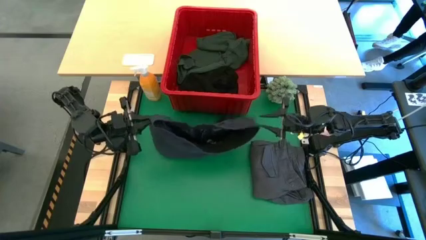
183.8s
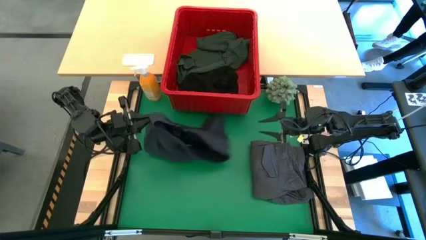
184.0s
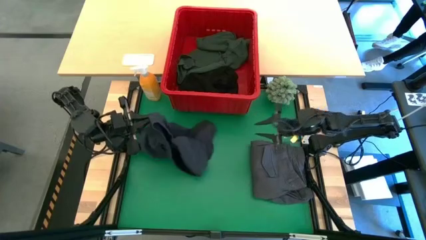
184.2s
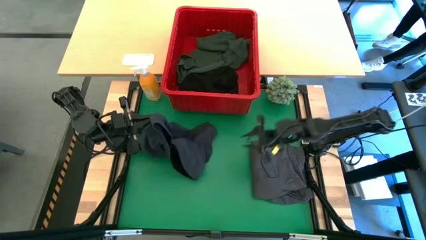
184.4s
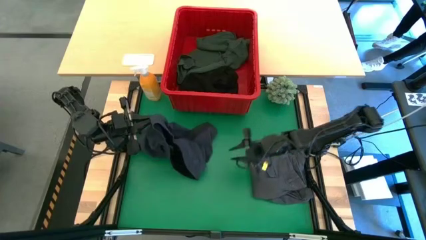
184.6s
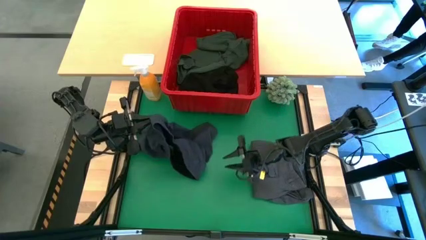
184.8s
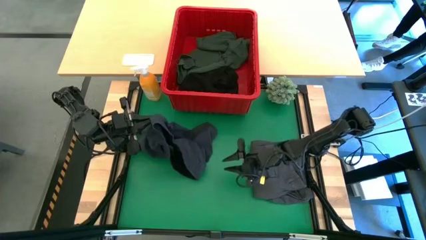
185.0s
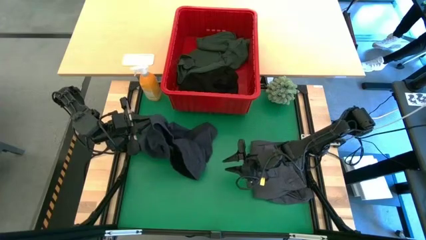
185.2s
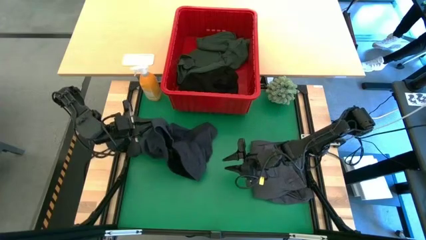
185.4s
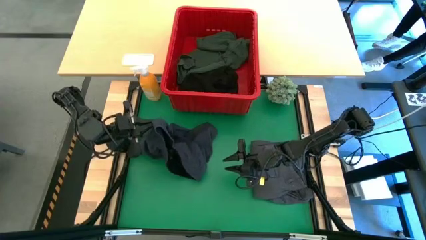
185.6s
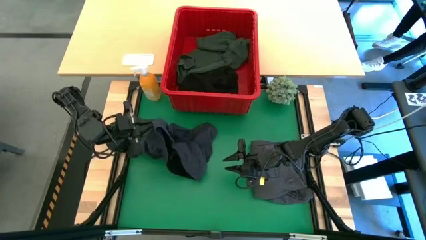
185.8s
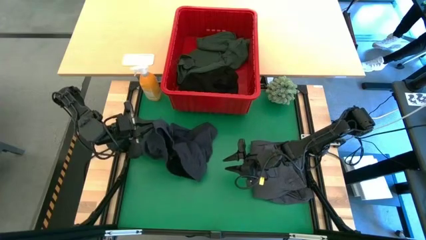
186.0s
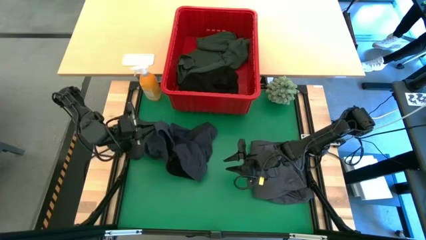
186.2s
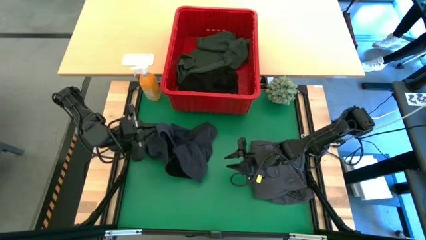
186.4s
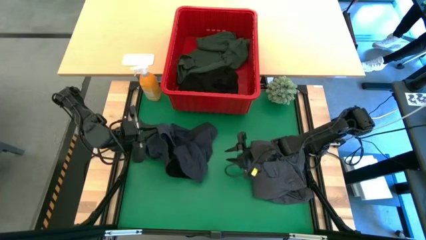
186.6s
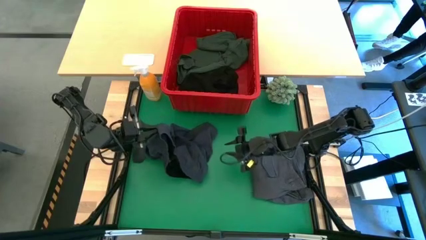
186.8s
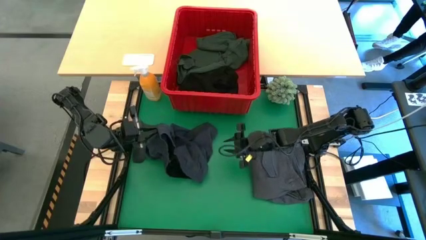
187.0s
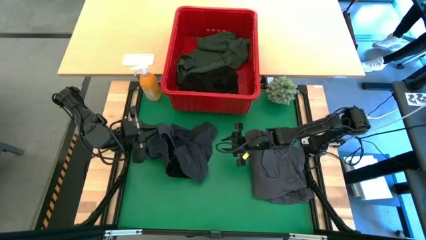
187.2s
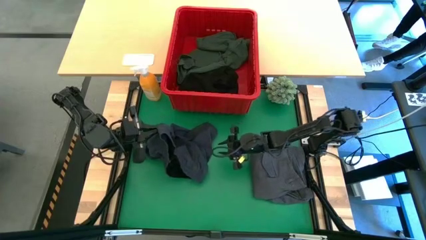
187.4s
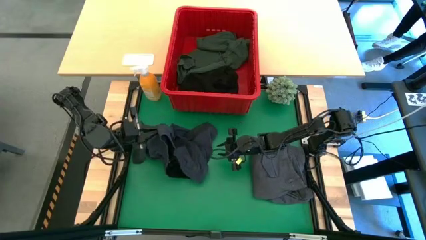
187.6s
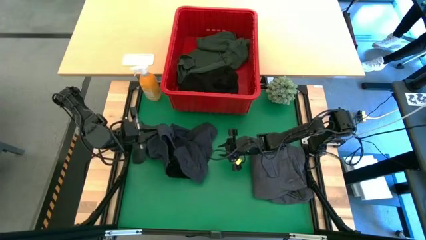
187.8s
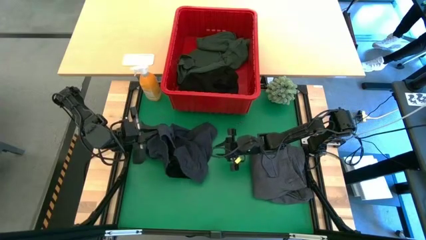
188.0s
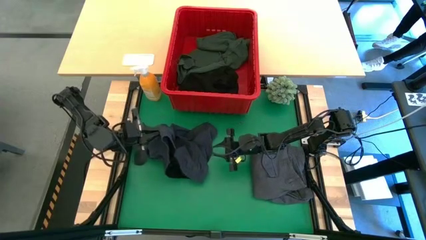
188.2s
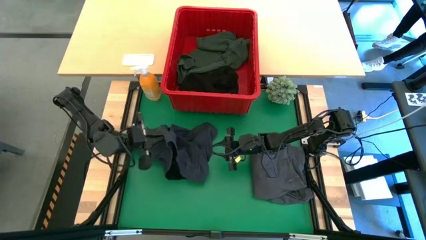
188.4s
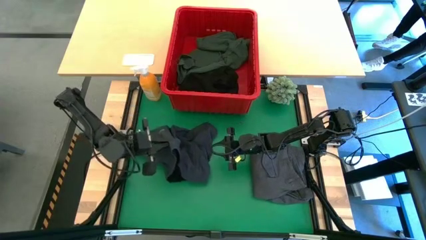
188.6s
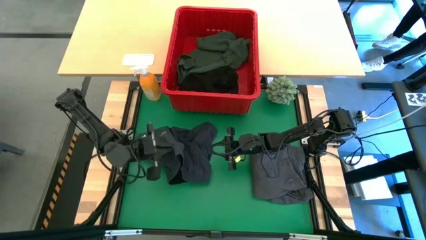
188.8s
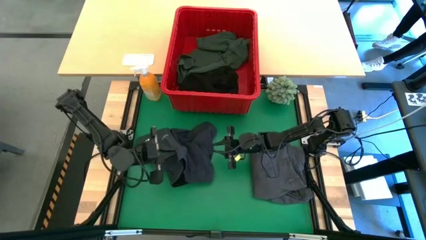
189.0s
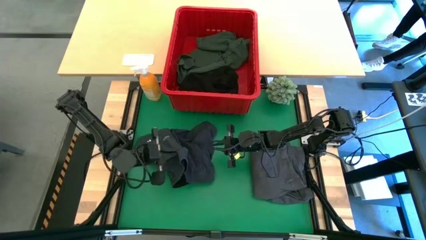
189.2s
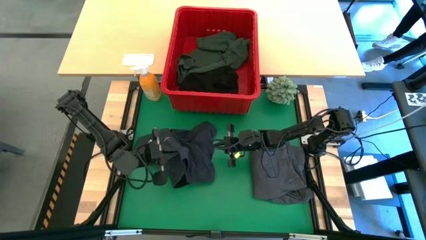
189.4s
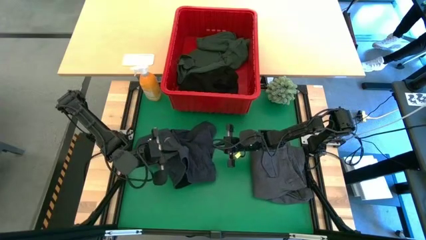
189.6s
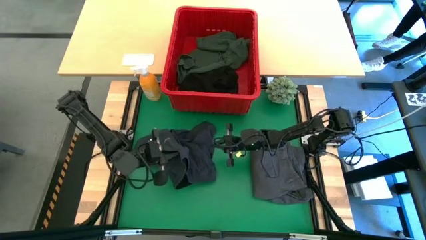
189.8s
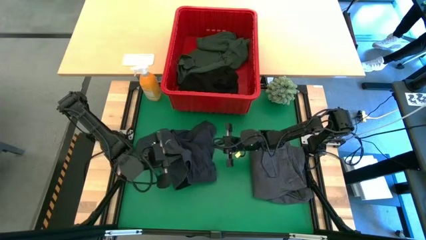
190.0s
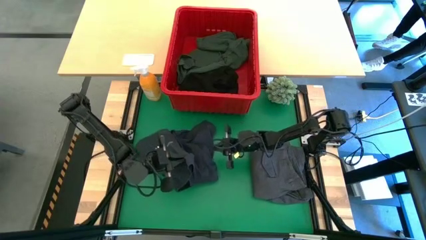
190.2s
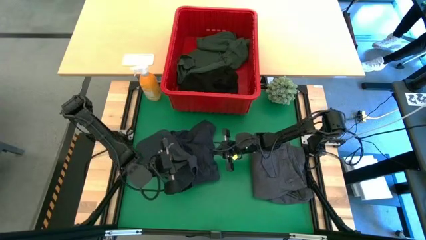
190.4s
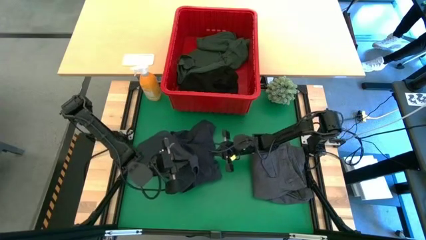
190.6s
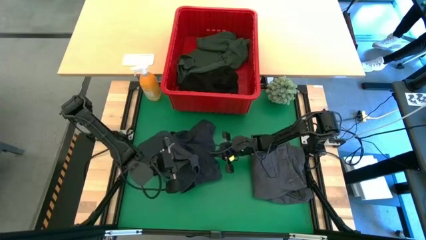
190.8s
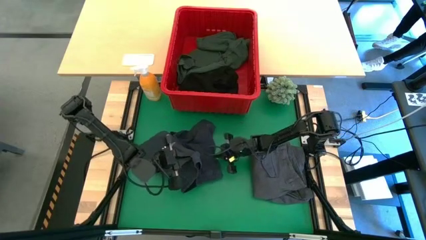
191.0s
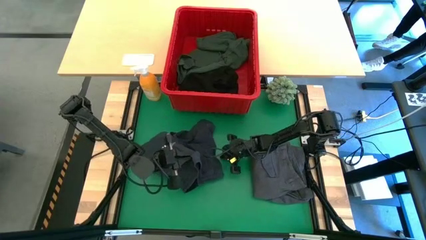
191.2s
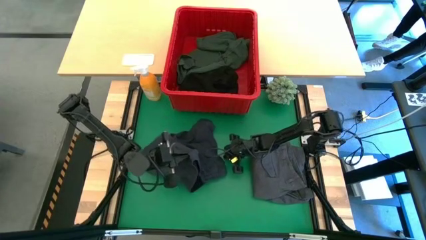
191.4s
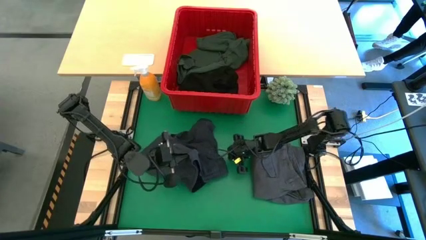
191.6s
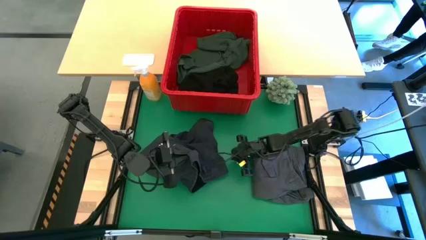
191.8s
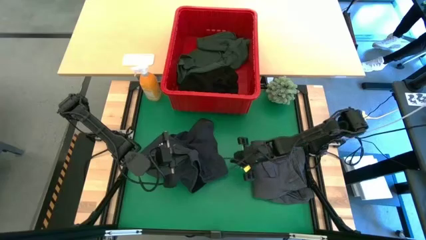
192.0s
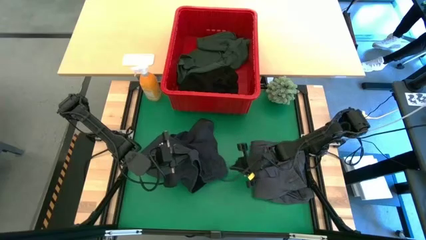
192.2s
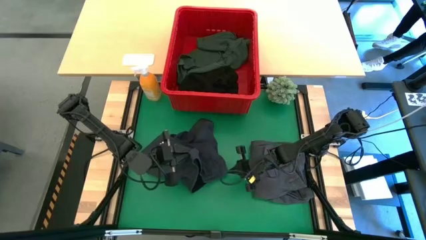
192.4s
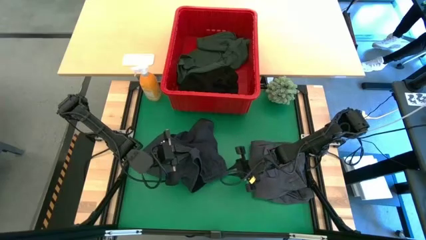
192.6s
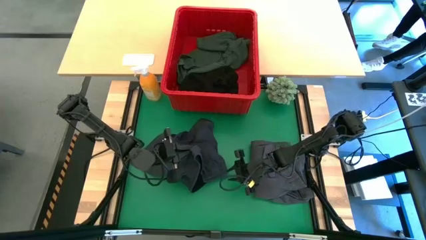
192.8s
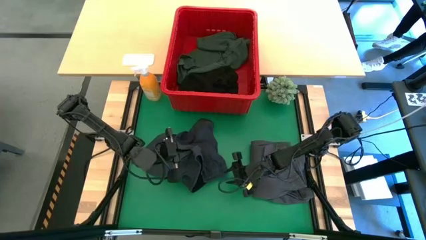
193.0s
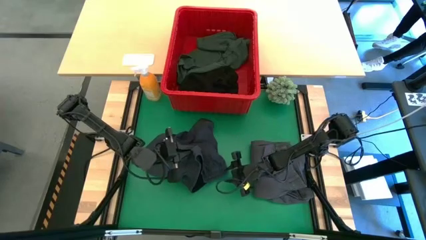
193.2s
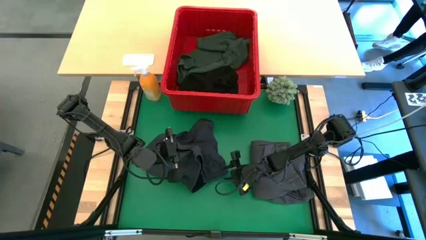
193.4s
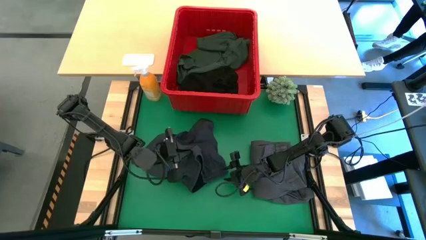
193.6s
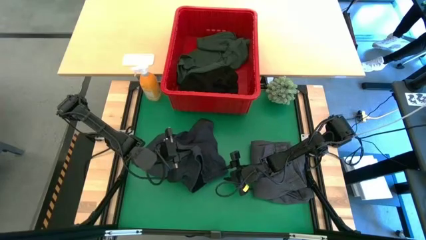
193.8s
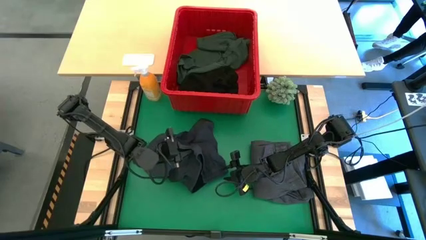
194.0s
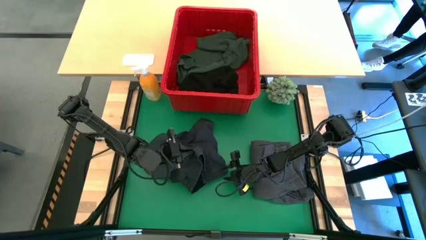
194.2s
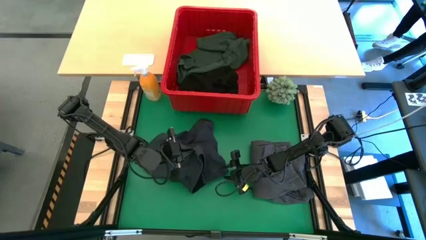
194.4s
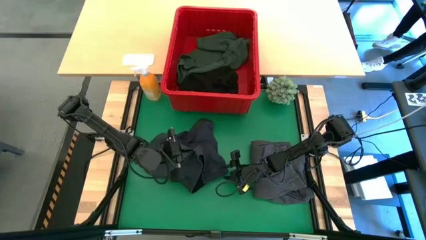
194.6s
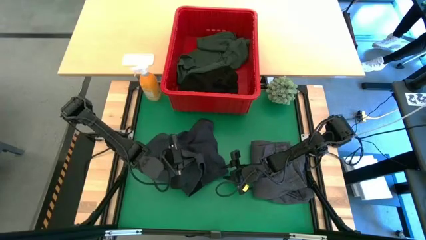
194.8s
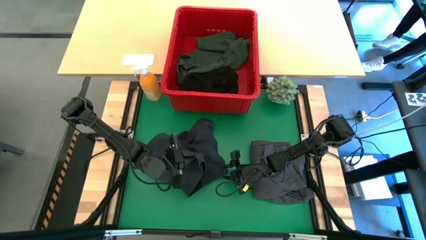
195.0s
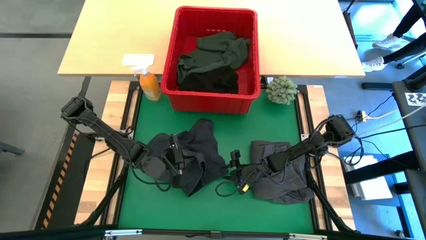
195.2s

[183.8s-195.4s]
Task: Fold Laundry from Bin
Fold the dark gray short

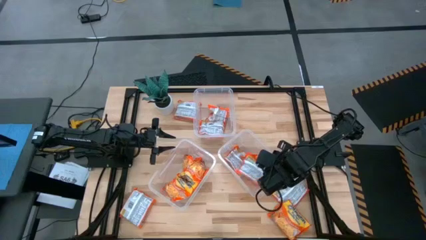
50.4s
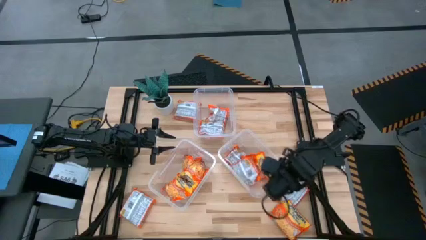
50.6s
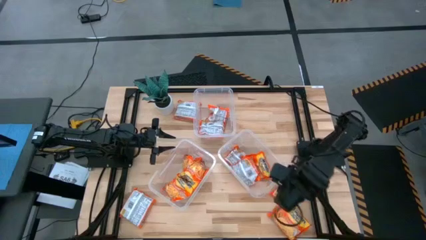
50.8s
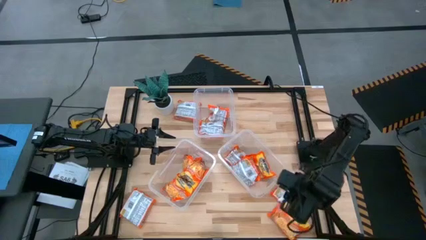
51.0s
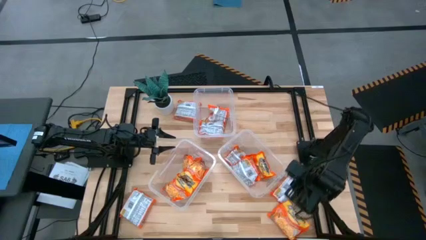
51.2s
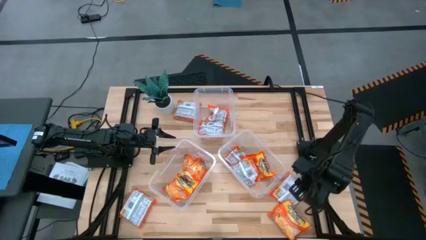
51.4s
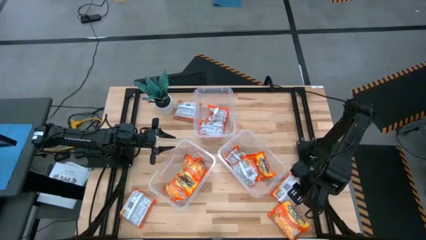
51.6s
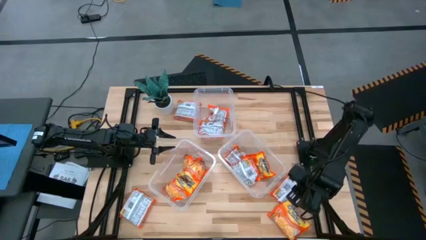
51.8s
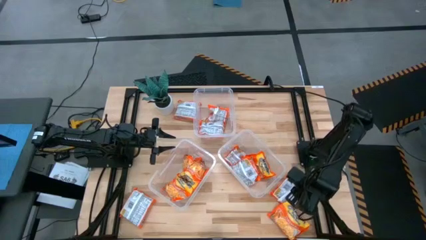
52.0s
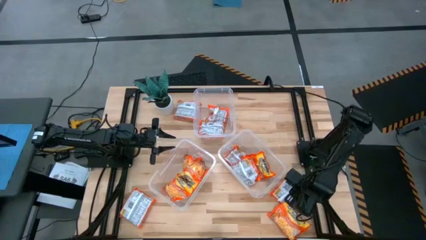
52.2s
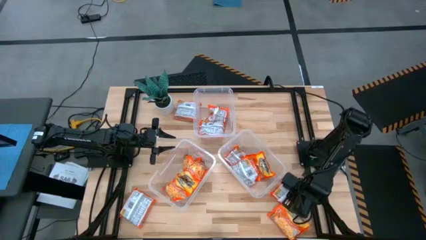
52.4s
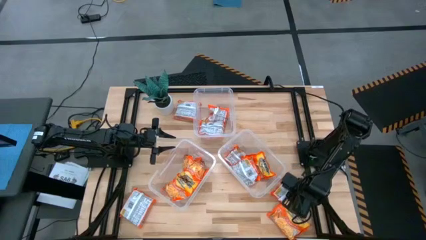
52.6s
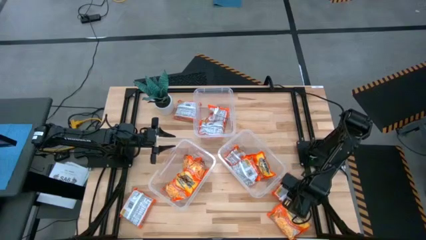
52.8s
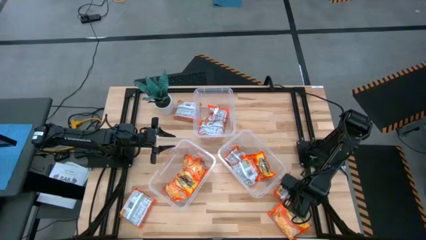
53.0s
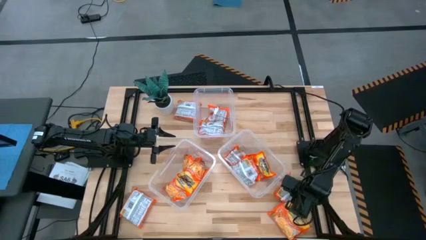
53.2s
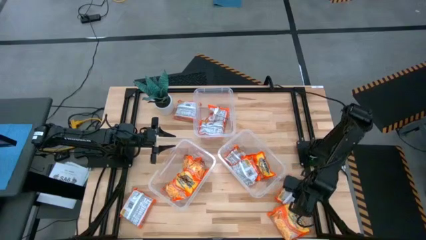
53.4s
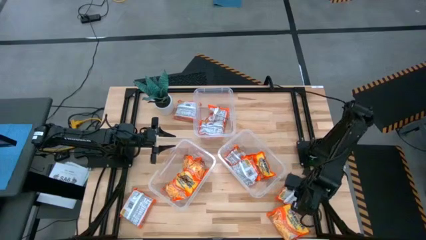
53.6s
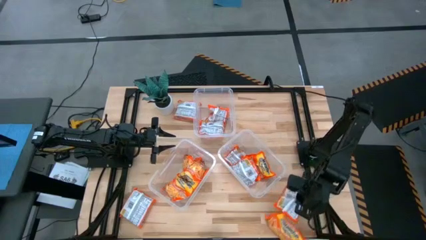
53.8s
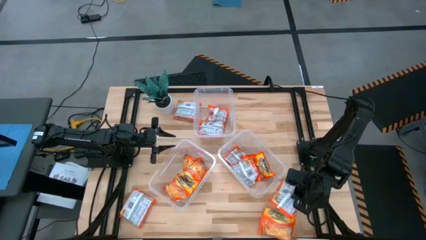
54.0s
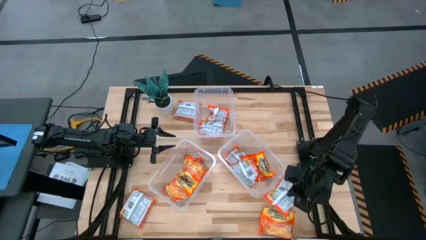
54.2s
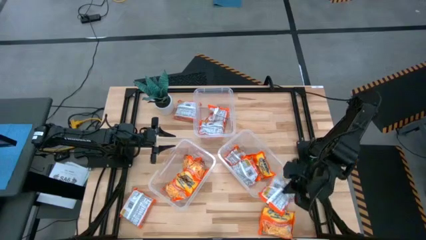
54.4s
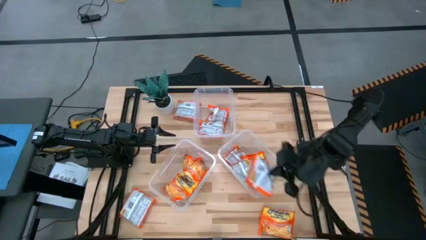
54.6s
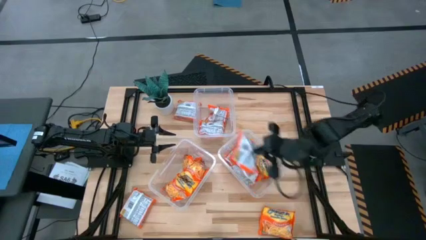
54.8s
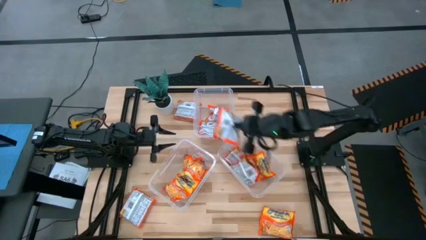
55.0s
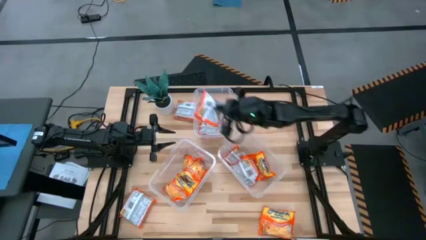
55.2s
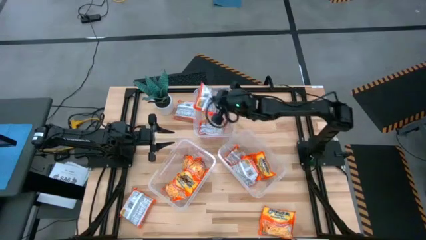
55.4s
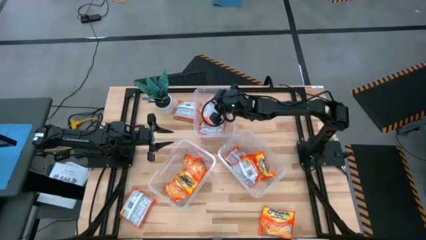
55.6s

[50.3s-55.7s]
Task: Sort Maruchan noodles
Put the noodle pack into the top transparent bin
